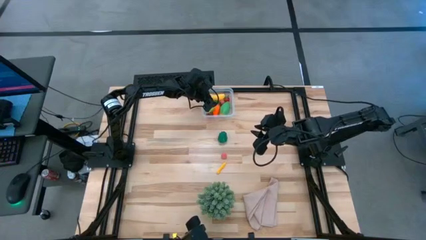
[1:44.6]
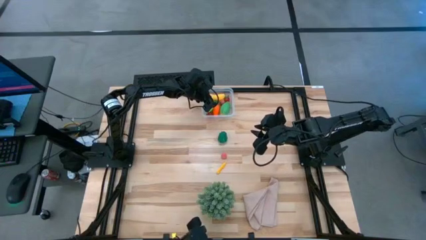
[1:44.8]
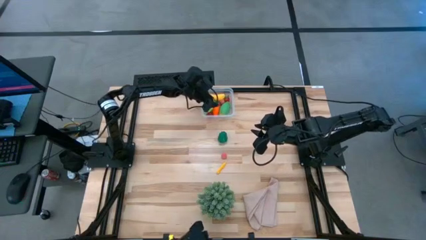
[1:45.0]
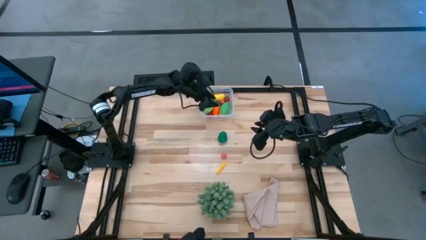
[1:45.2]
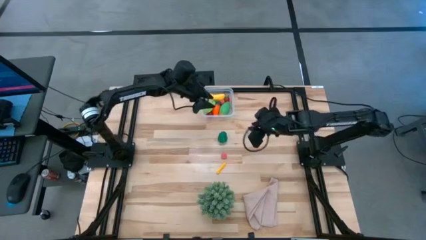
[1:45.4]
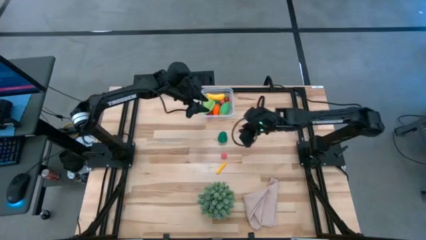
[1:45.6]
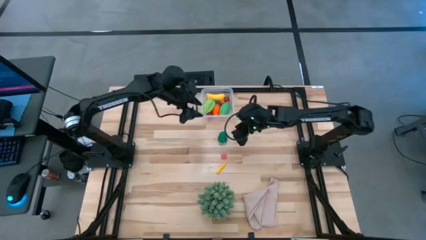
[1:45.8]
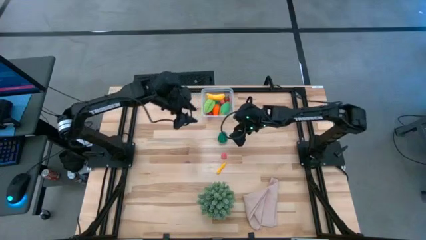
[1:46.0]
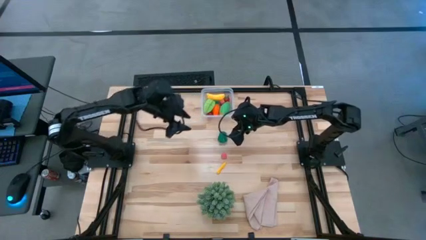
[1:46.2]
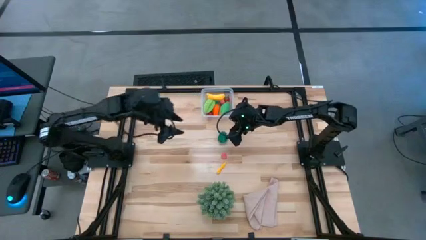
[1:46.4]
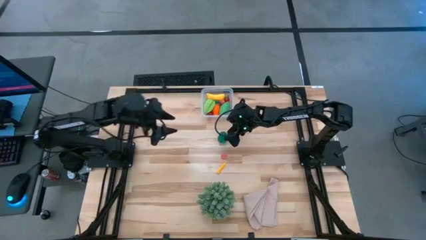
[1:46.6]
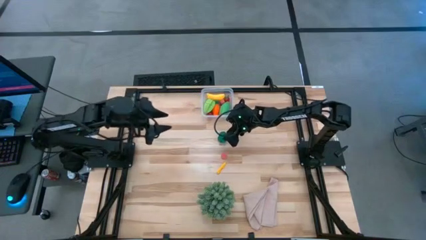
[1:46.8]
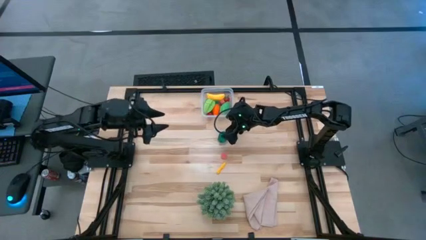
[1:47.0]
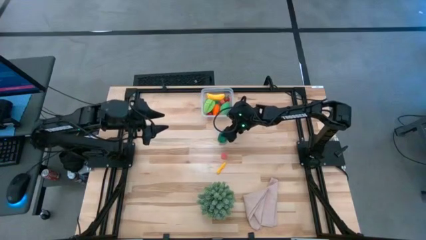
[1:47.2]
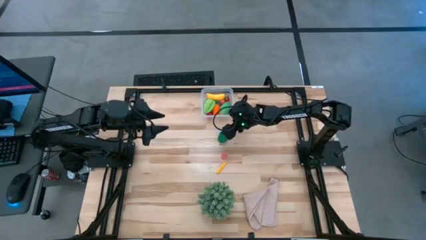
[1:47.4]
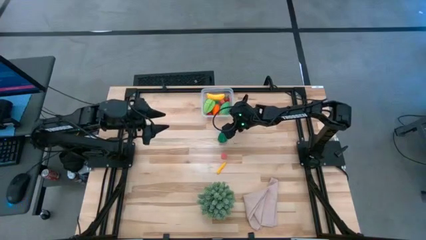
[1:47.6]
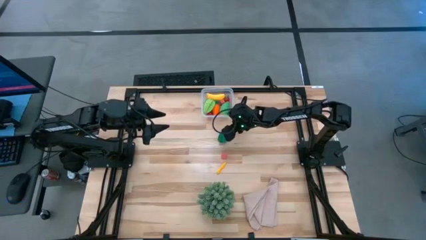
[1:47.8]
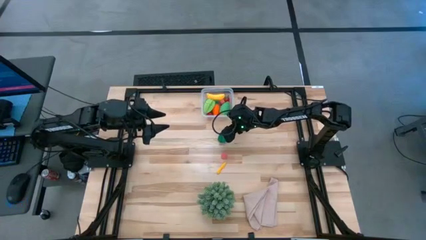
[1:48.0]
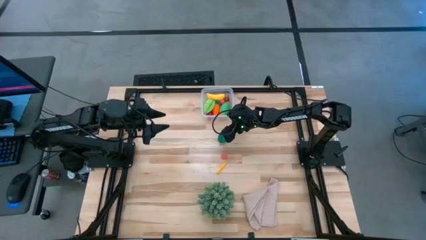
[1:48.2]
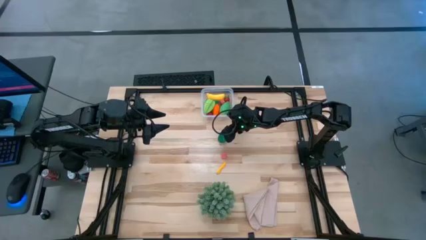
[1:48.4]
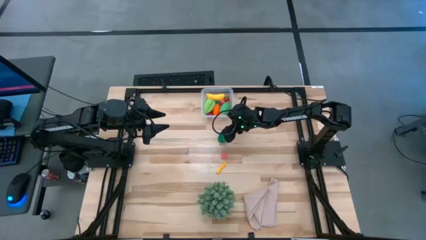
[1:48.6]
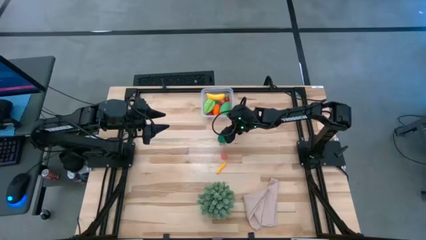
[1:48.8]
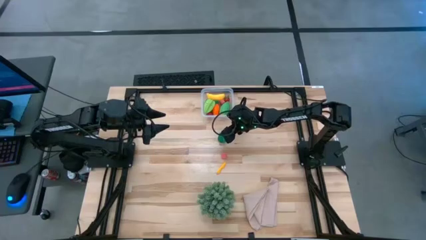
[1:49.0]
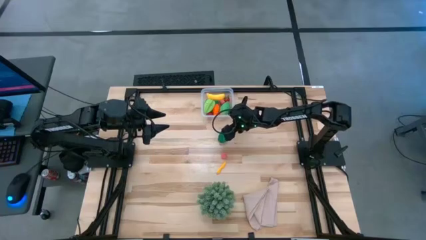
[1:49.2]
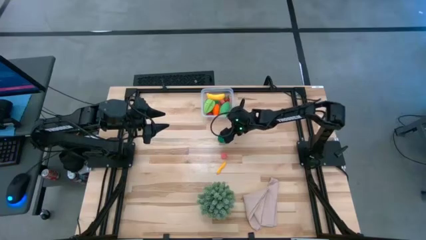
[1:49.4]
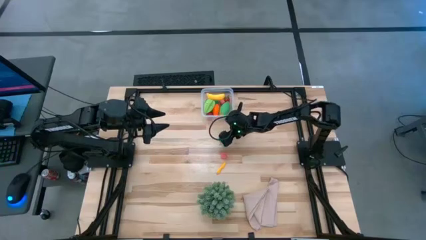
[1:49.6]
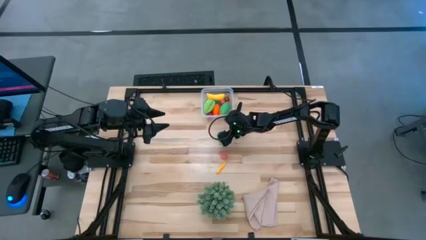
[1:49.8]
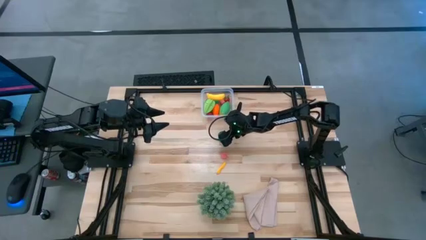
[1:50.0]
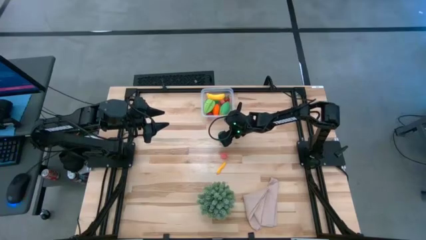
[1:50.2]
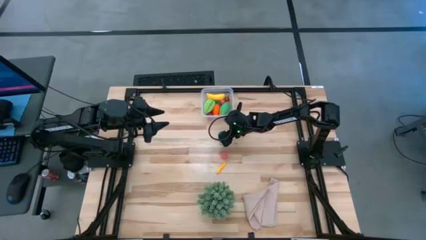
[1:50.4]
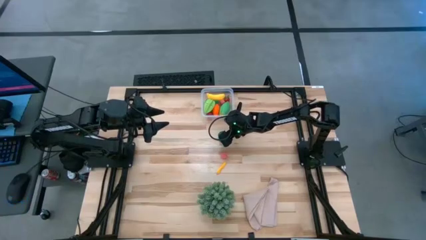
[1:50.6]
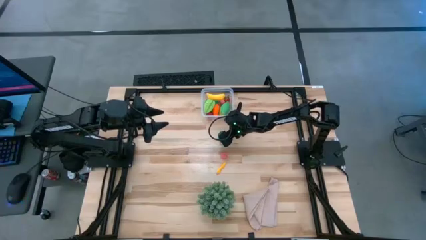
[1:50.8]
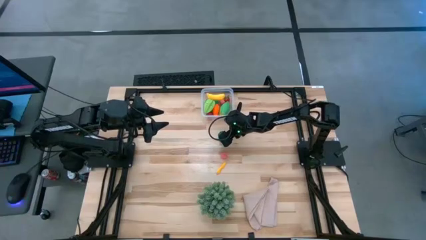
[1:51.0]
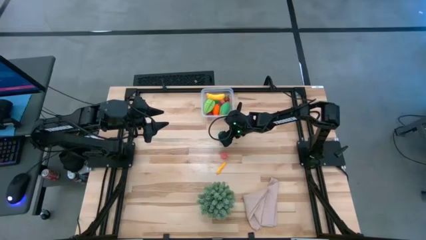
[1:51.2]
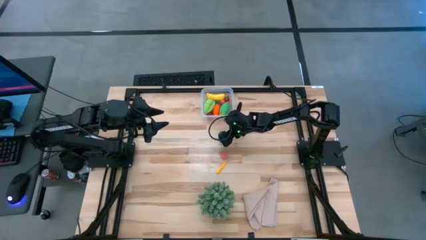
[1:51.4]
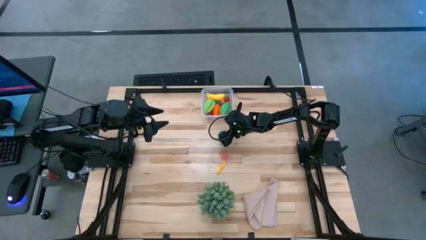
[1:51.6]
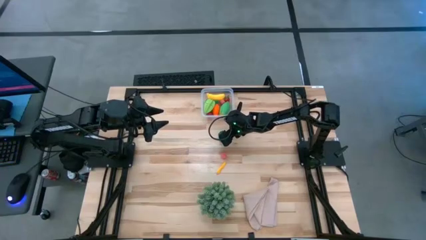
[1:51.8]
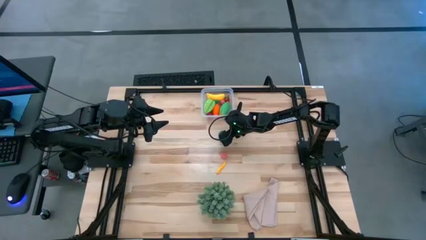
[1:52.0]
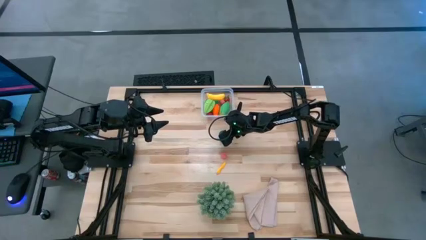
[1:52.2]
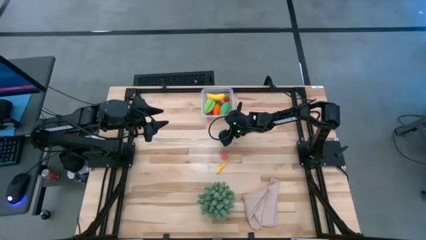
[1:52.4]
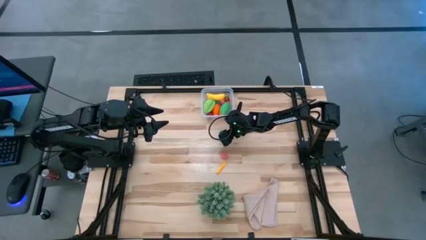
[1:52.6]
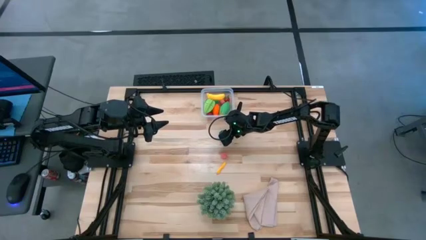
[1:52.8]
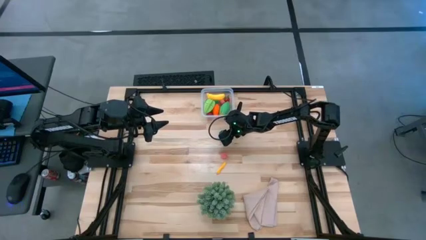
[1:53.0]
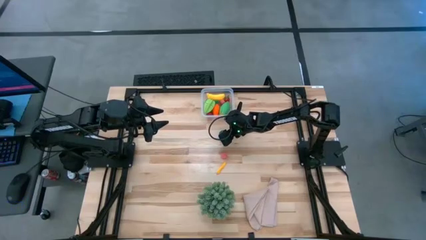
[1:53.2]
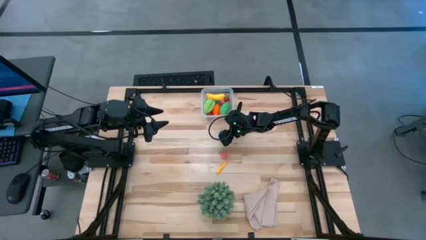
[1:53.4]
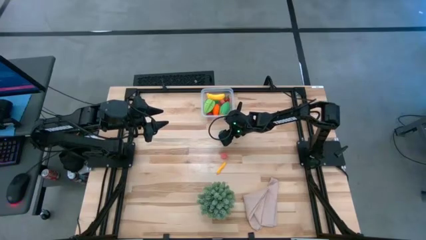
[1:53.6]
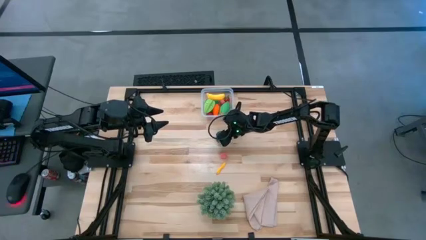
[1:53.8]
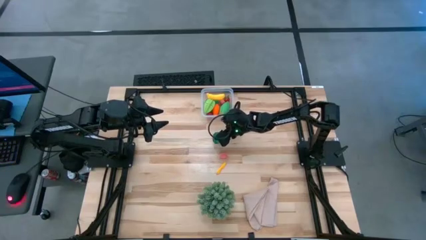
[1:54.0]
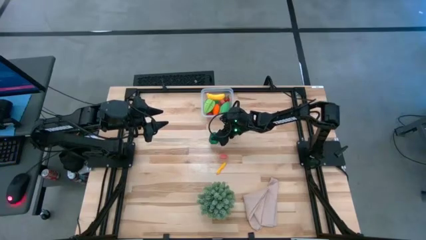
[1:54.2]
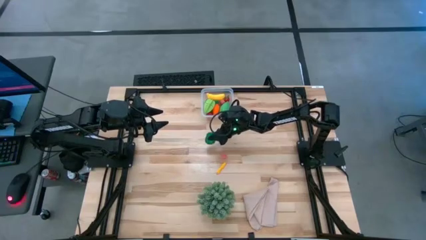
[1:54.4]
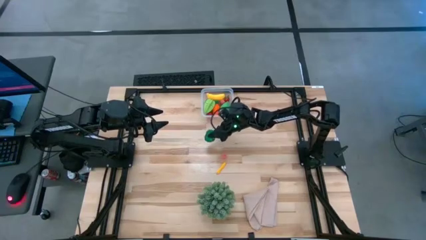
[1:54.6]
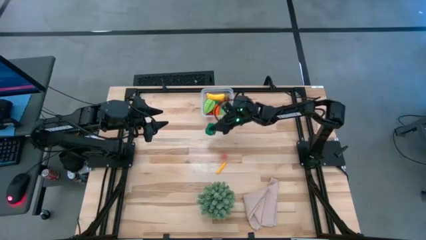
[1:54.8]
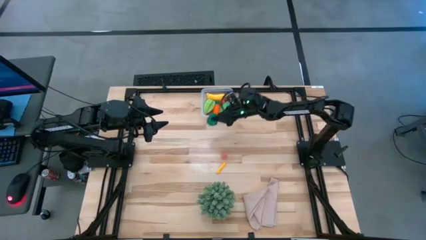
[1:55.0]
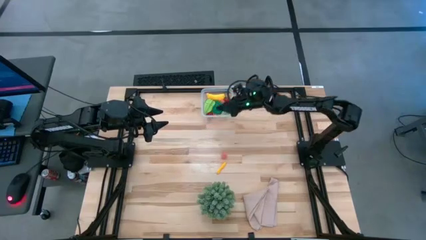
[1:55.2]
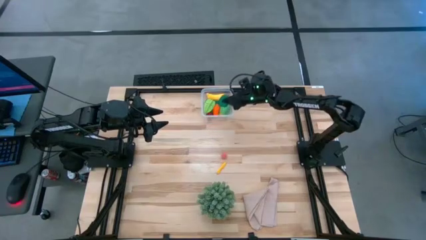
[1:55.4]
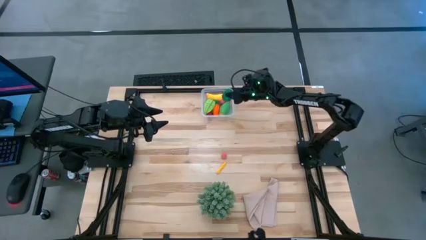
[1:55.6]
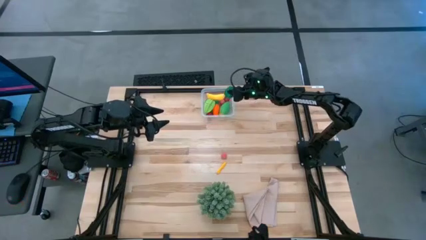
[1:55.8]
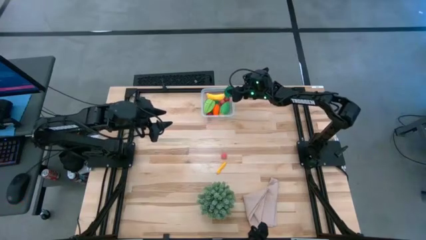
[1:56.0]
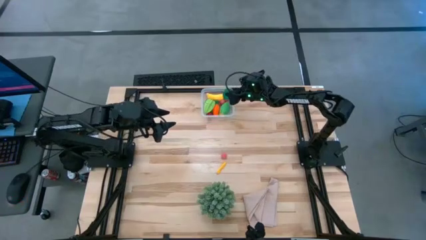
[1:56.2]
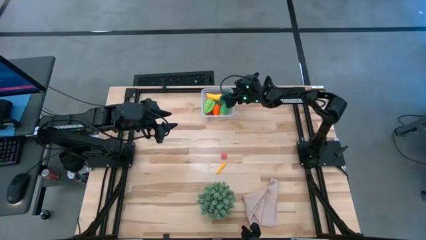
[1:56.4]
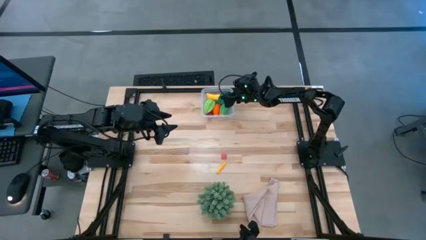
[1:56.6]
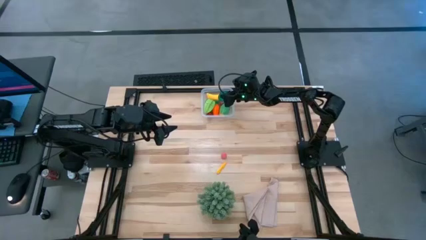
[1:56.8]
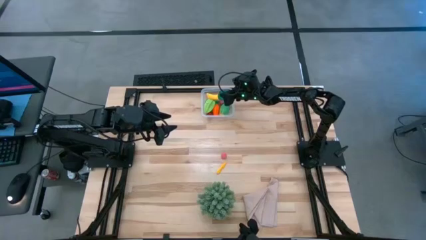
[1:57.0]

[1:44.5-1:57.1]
Task: Pick and placing Produce into tupperware
Put the bell pepper into the transparent bin

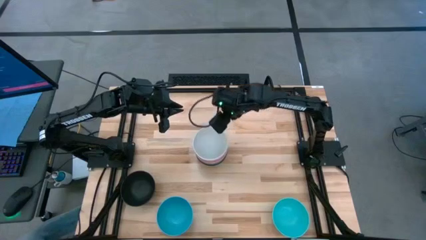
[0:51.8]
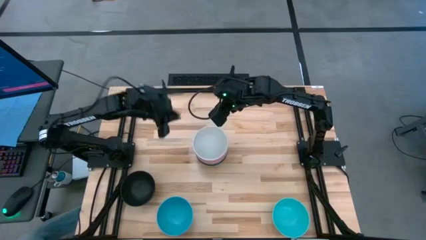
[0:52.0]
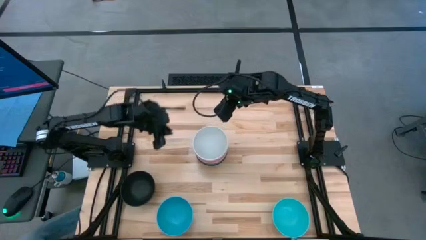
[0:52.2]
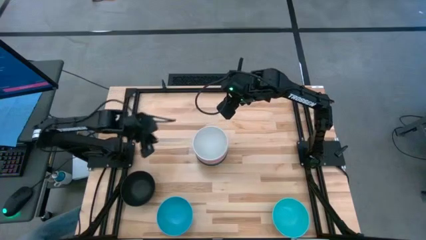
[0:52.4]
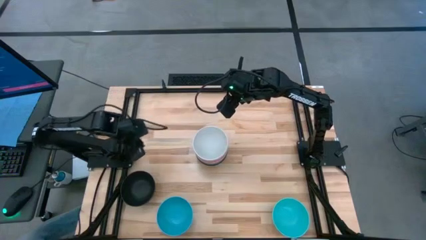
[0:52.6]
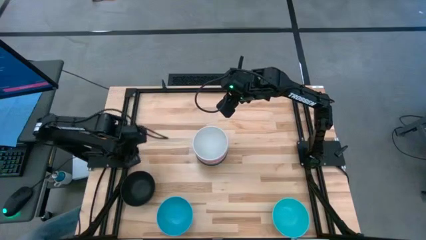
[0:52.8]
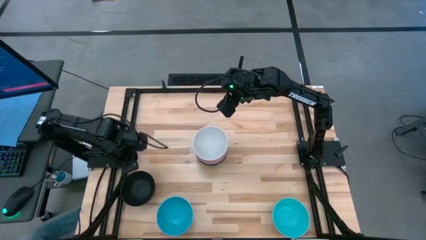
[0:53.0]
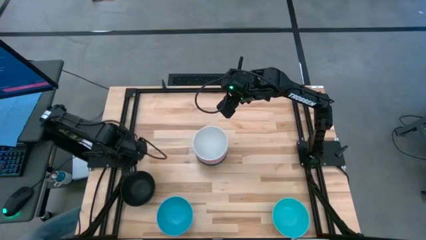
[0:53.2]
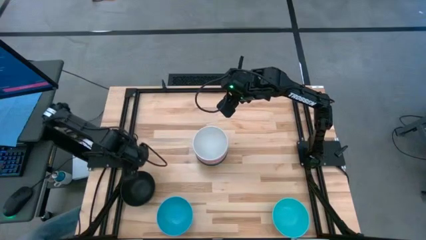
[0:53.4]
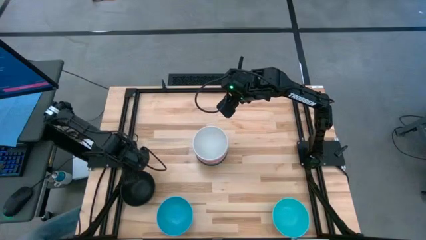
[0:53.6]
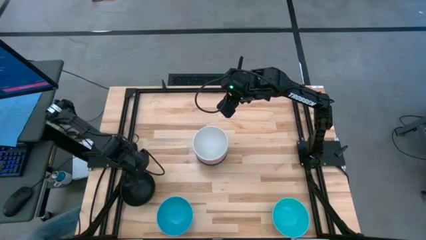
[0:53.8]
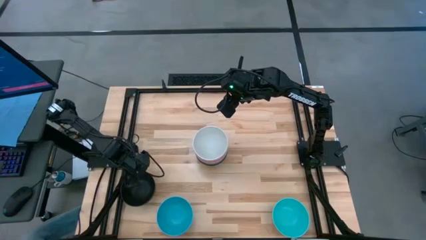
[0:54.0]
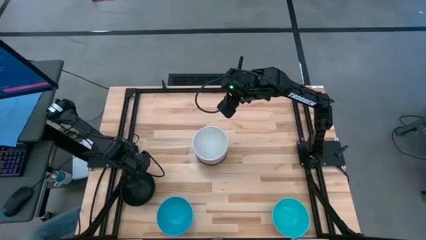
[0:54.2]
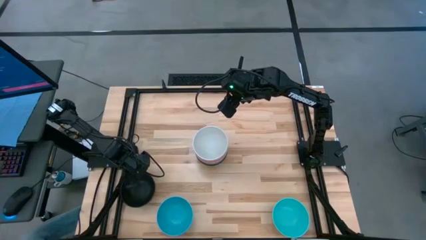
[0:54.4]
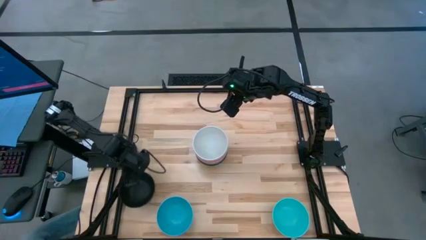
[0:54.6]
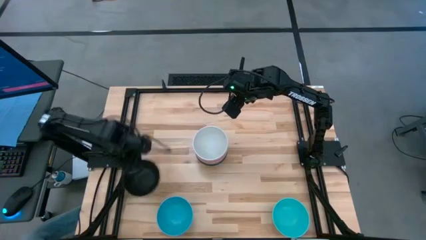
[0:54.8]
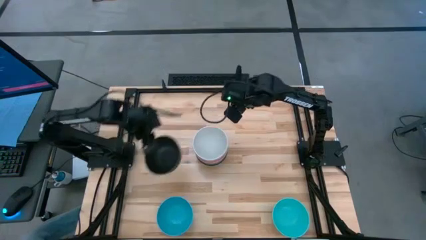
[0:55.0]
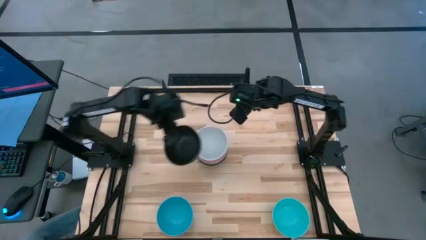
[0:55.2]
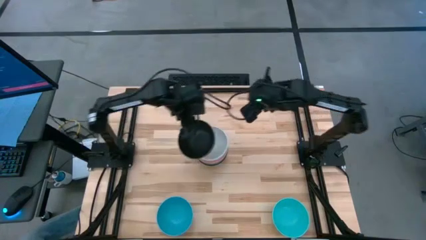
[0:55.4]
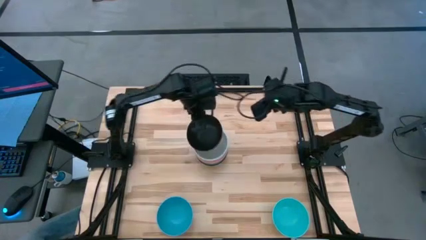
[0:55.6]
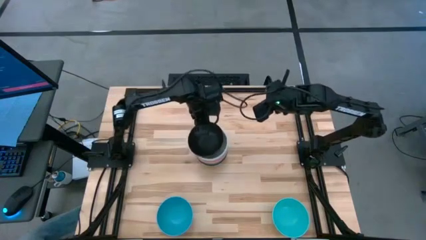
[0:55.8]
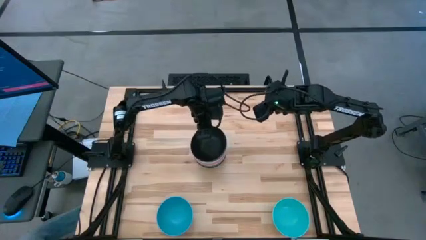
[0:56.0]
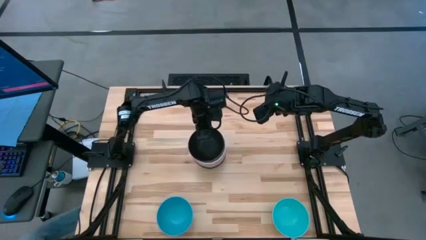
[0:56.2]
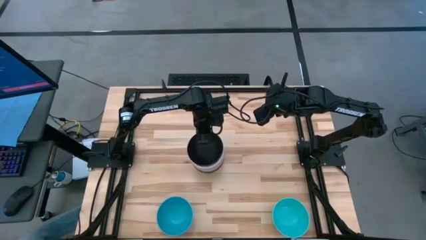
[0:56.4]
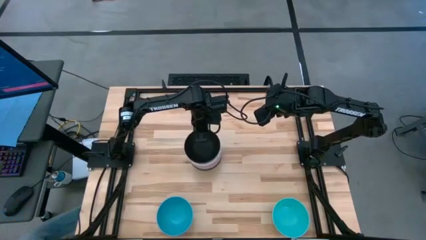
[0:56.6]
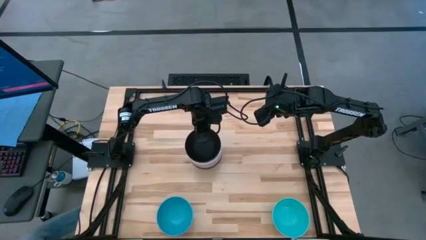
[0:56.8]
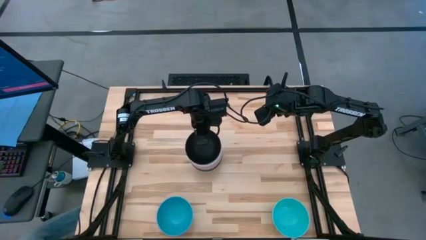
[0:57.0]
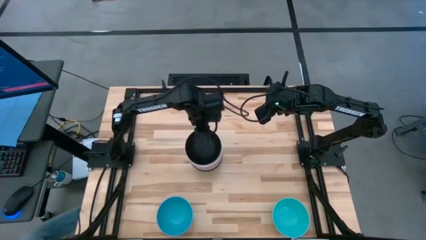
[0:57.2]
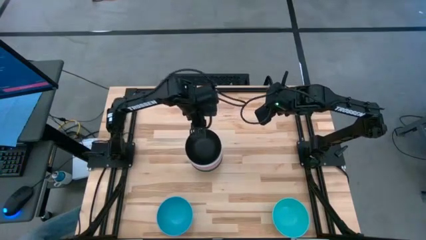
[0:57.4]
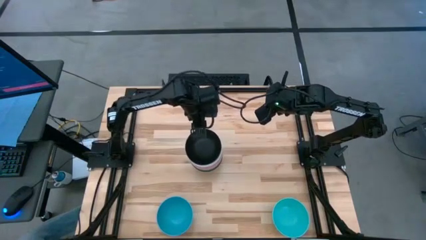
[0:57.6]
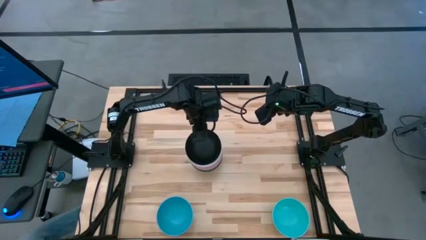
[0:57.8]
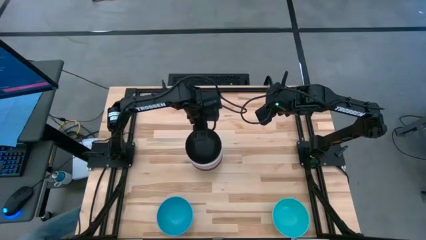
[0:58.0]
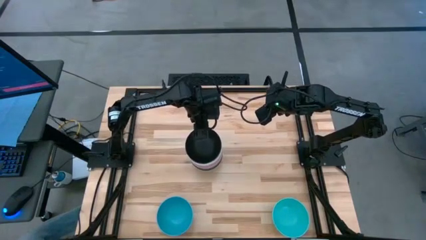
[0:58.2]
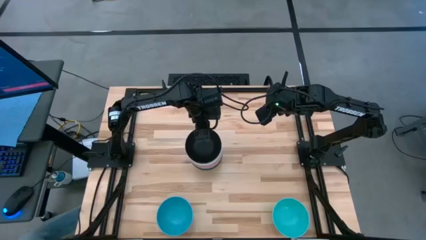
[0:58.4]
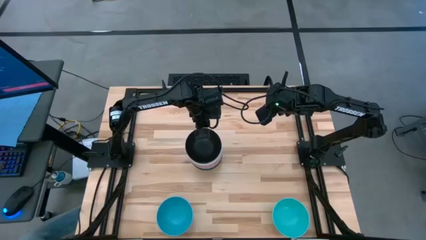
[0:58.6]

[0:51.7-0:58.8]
Task: Nest bowls inside each other
Stack the black bowl on top of the white bowl
